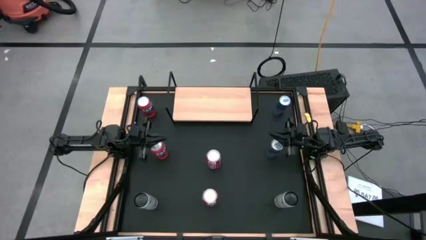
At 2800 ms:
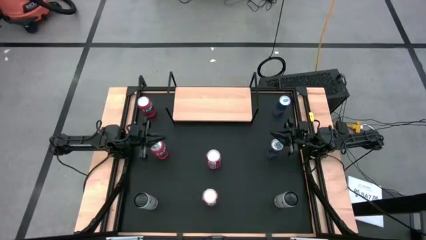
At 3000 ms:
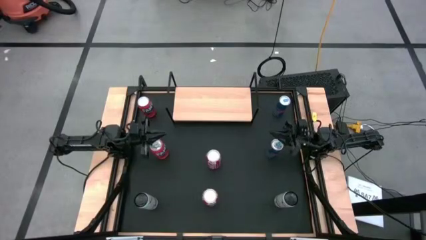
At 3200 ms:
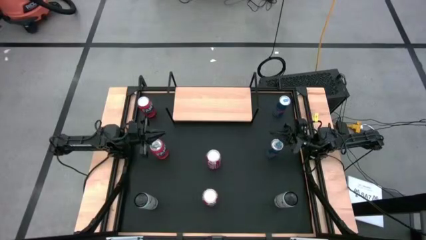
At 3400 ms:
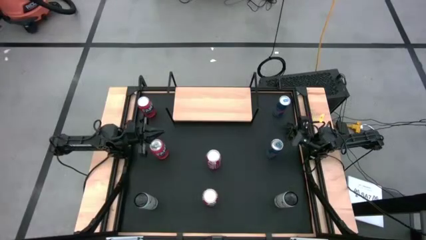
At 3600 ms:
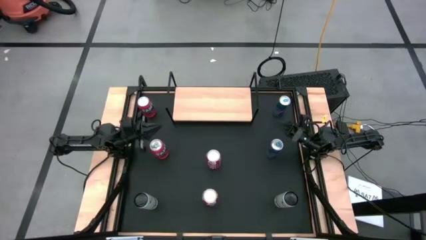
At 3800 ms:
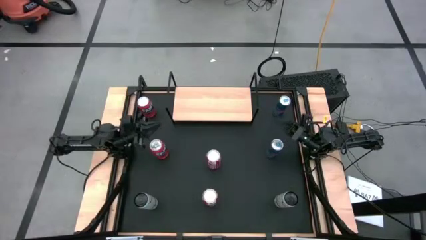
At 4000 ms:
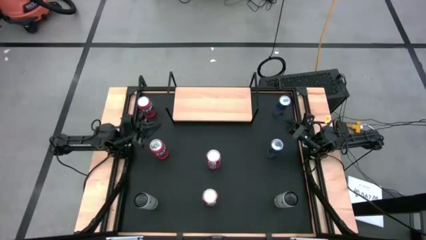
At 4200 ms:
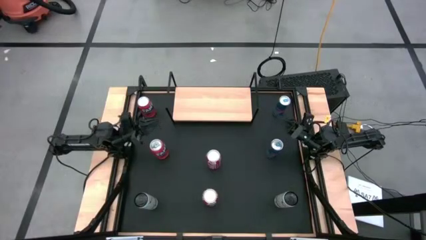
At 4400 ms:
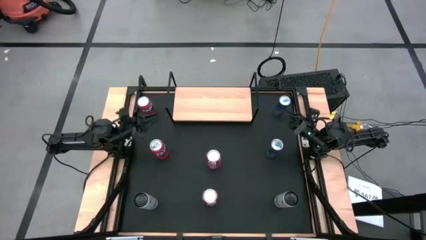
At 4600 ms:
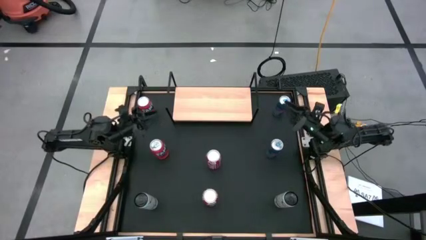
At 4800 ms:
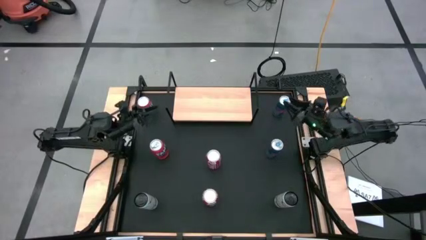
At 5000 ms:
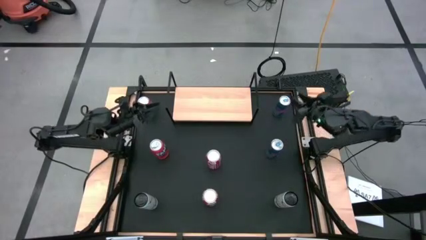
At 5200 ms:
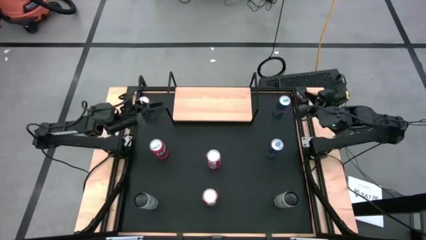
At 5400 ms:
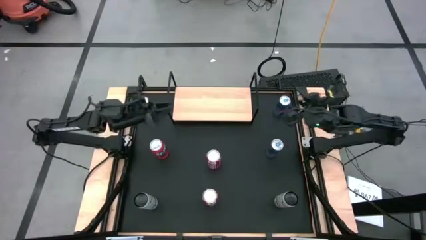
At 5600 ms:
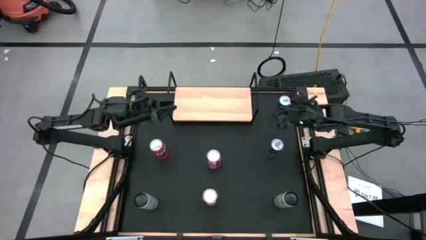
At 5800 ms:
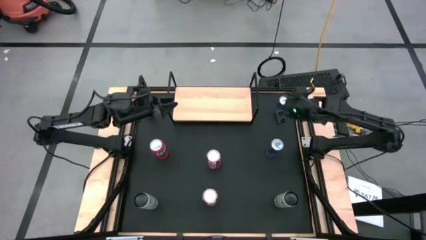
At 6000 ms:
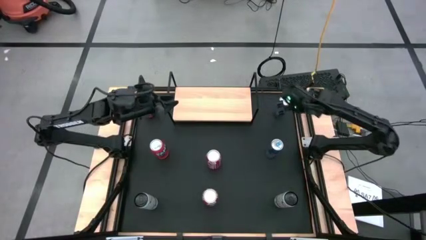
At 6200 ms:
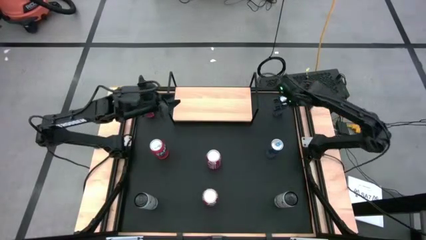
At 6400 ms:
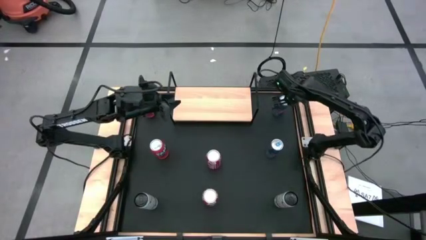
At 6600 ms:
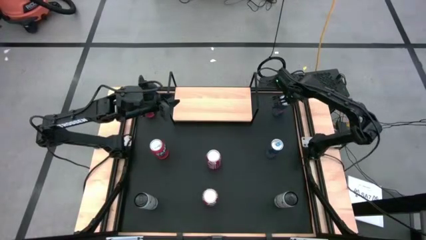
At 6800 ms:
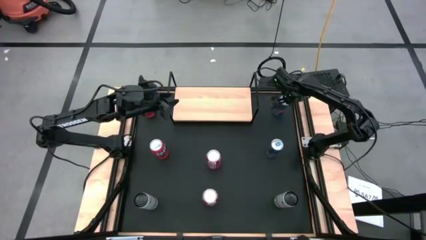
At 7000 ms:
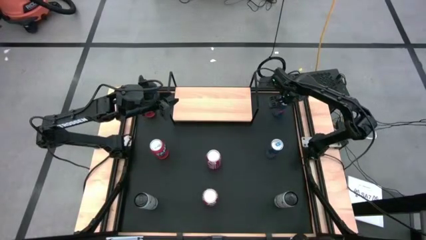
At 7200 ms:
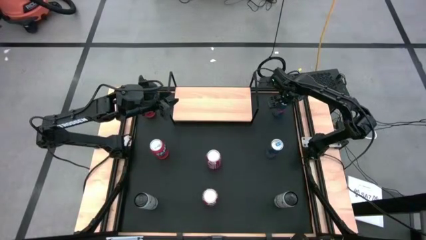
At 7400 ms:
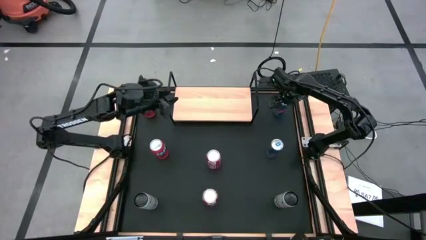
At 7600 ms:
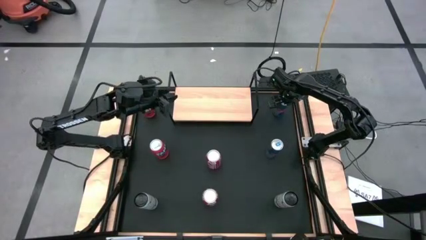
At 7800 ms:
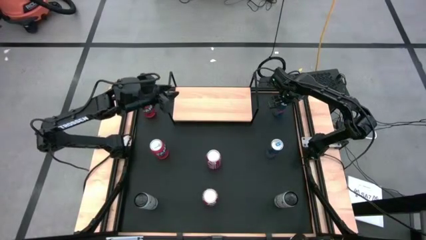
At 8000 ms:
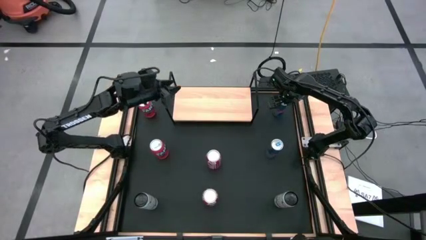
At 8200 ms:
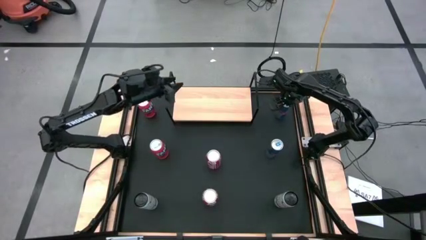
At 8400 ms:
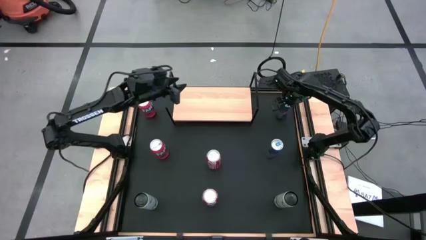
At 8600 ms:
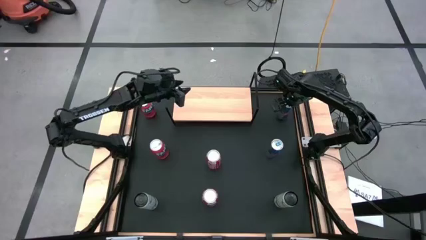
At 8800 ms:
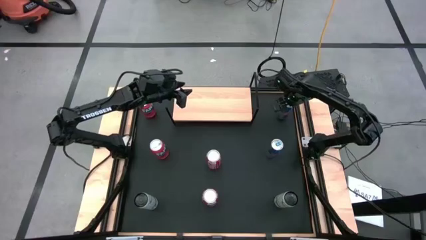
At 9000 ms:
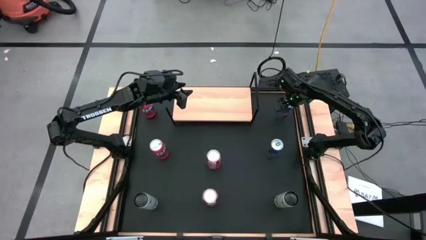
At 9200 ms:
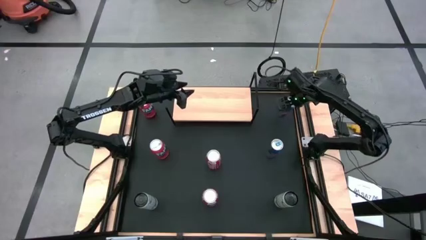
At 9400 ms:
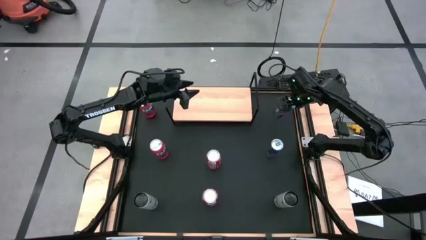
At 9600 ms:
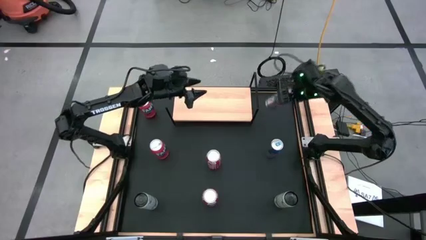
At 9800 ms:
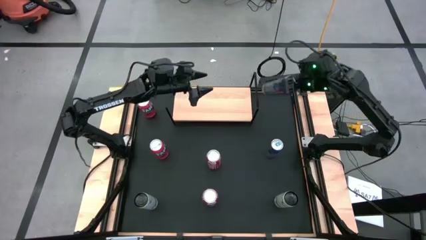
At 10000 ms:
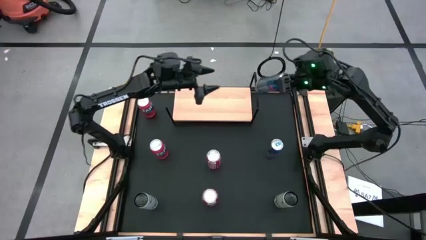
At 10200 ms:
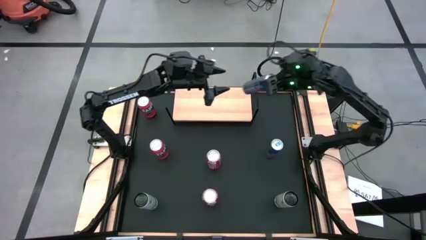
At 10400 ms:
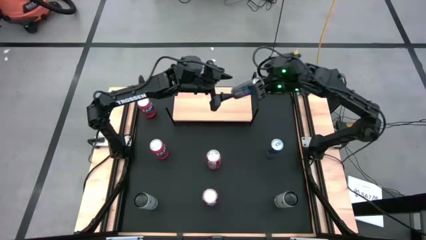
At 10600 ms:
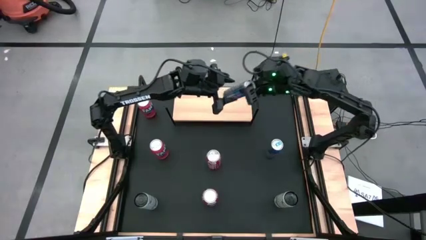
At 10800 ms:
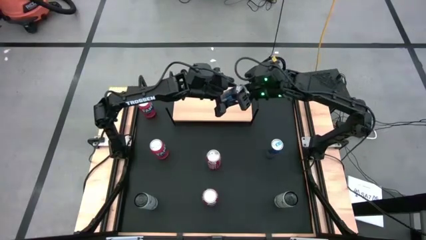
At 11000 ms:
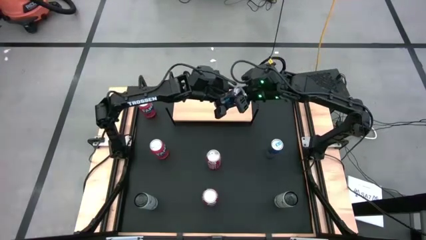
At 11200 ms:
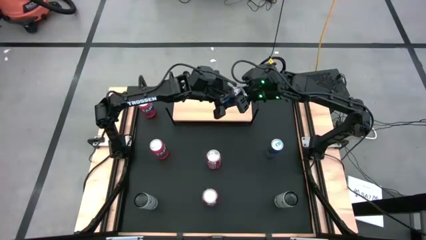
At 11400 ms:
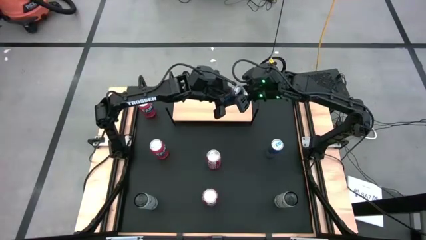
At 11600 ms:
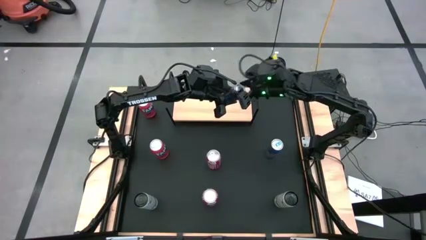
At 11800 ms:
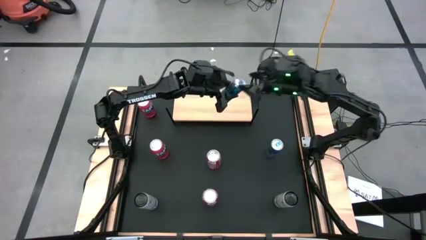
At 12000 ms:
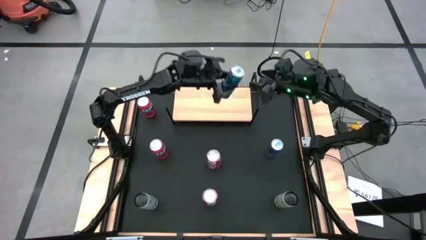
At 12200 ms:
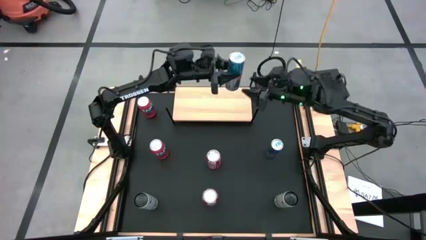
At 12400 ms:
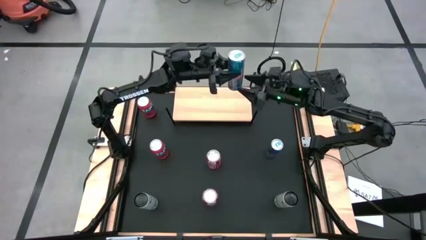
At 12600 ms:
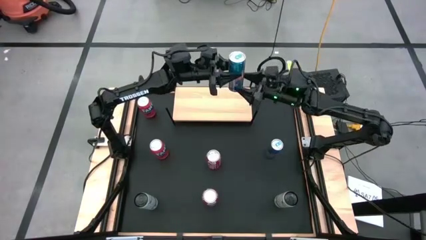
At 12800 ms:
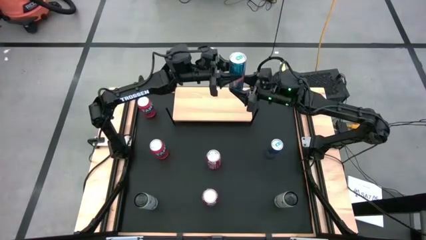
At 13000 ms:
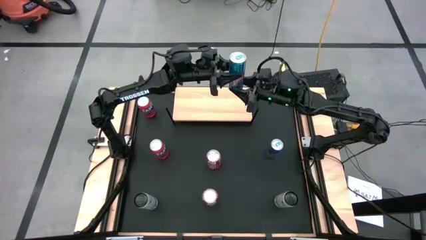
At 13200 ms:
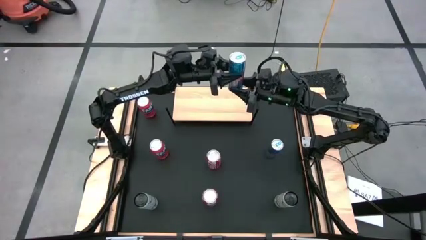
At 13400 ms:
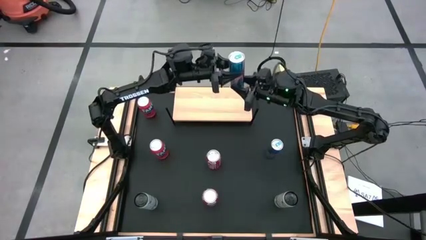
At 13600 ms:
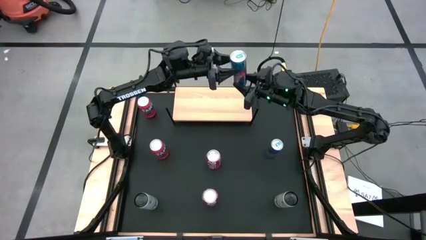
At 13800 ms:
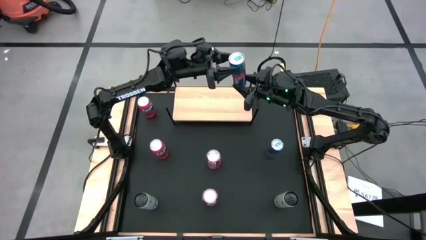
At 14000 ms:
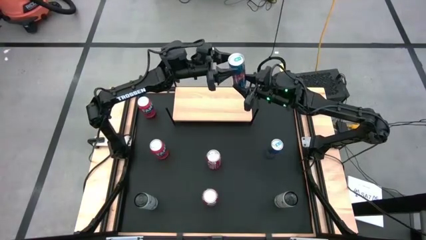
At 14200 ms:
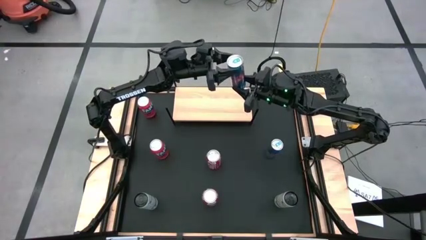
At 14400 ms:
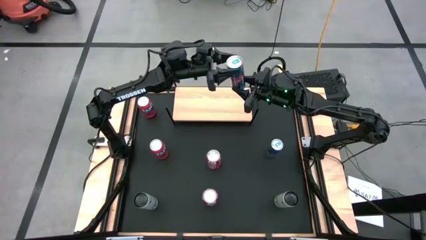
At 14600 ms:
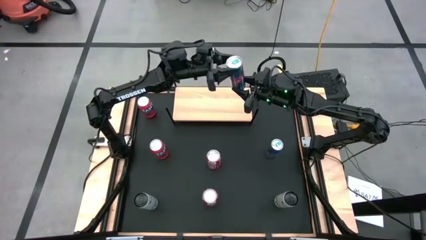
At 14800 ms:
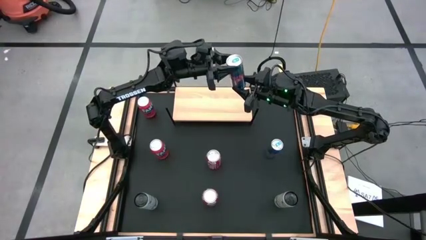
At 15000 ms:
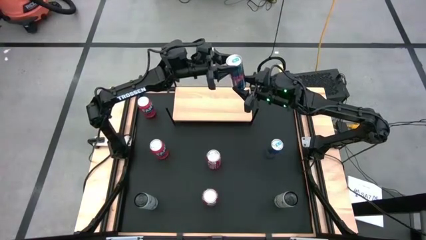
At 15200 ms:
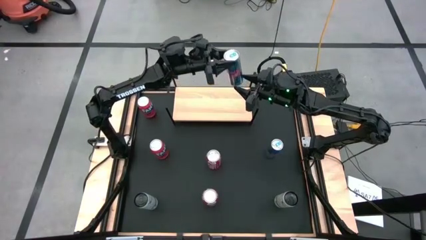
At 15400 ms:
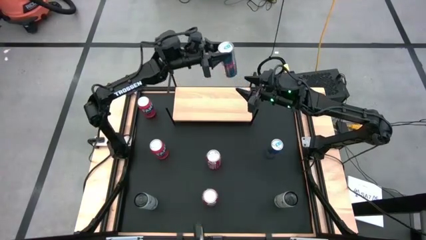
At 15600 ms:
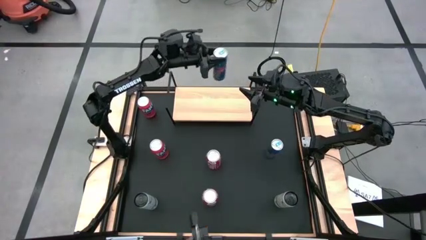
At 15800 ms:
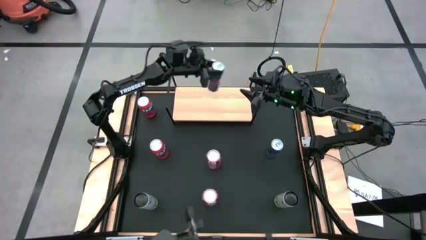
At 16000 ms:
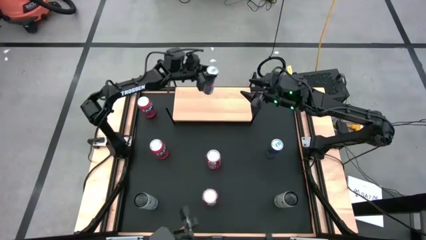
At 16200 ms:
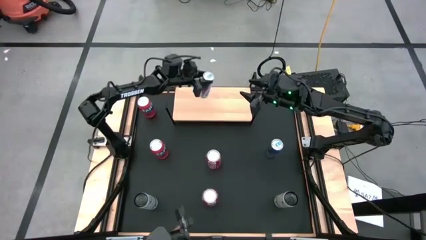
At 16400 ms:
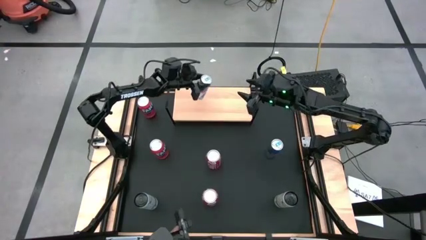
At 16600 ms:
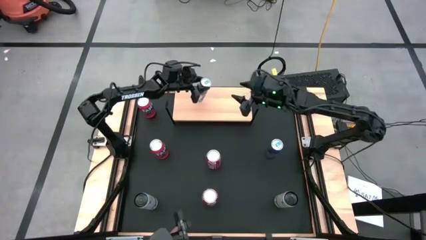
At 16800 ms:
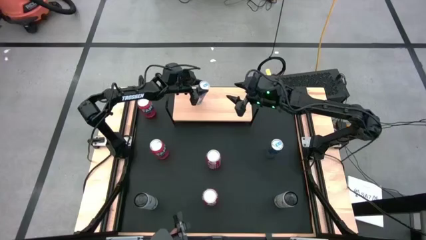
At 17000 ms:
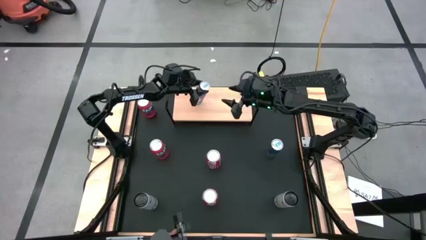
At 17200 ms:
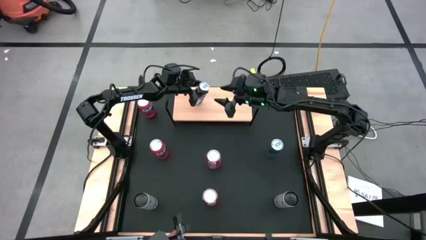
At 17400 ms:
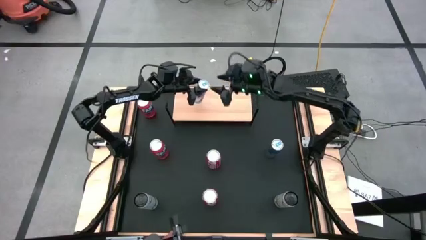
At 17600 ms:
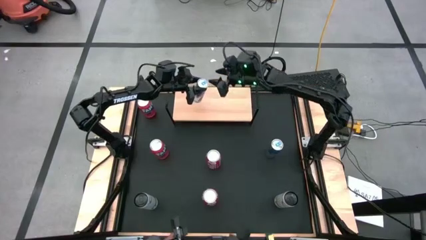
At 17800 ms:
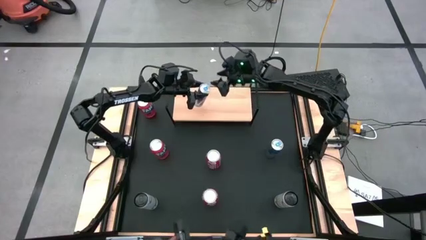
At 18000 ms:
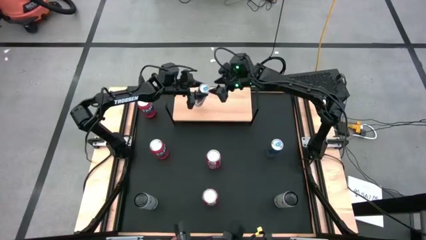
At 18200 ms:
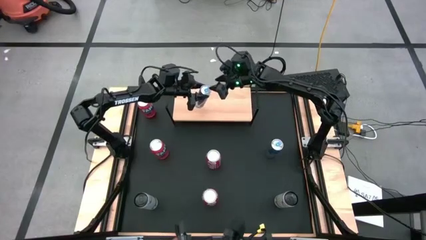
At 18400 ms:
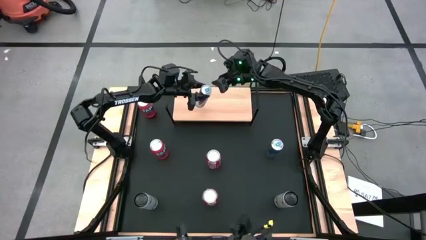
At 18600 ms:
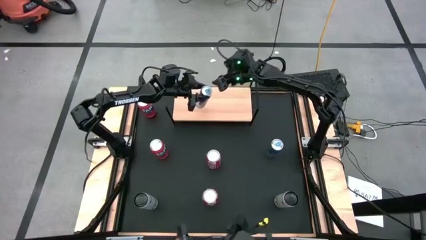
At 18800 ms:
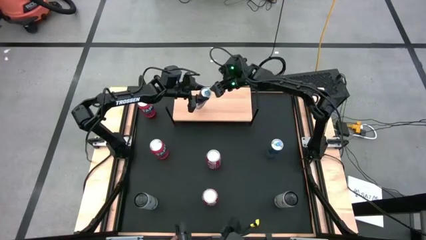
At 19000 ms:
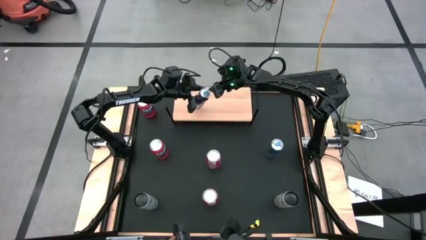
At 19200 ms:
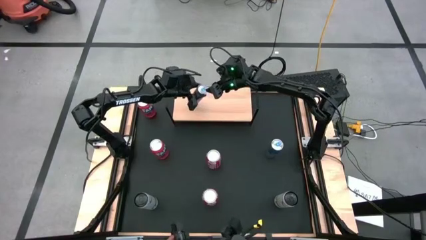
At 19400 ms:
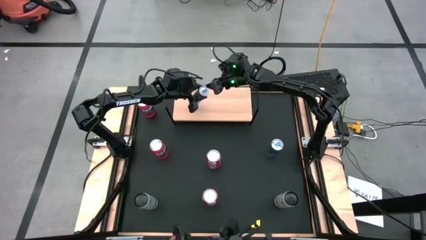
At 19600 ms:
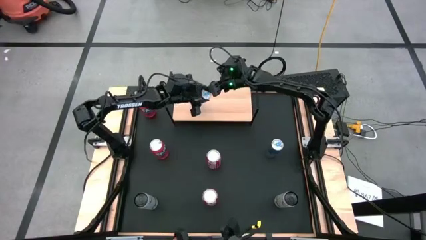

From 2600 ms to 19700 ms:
Task: Place canned beverage on shelf
Put the top blue soda can on the shelf
